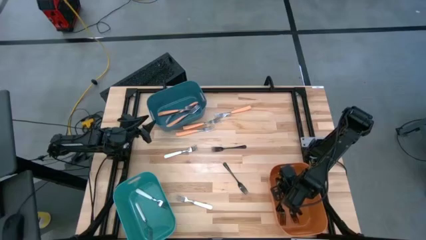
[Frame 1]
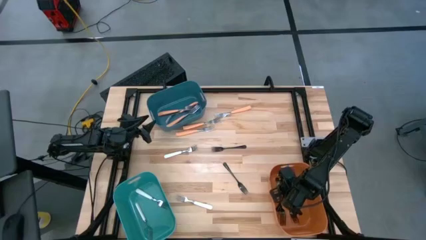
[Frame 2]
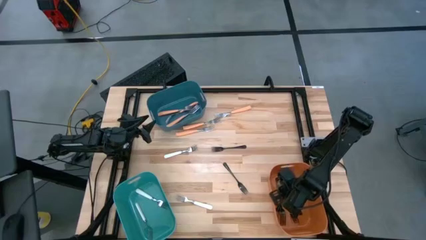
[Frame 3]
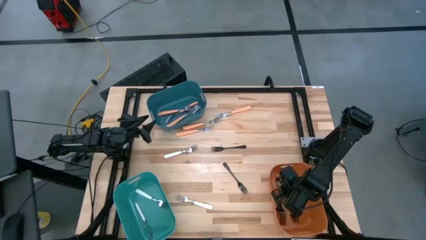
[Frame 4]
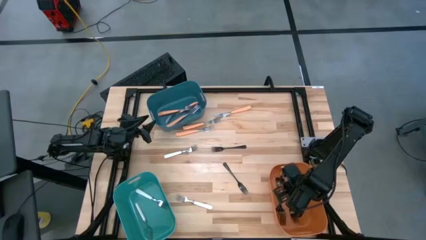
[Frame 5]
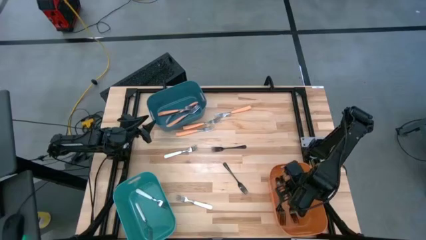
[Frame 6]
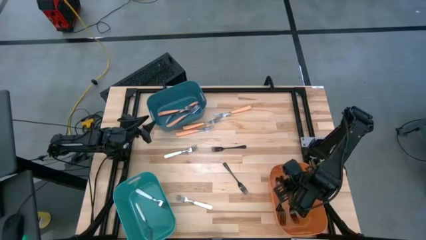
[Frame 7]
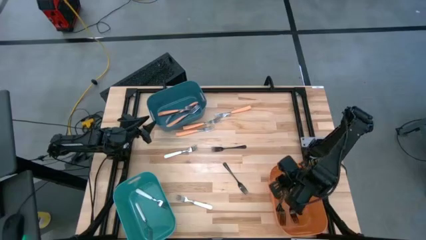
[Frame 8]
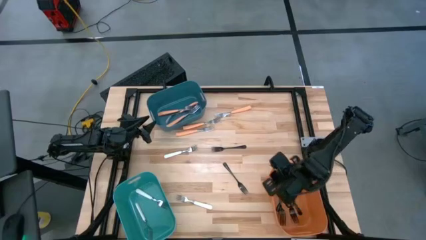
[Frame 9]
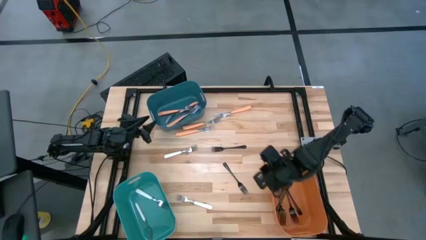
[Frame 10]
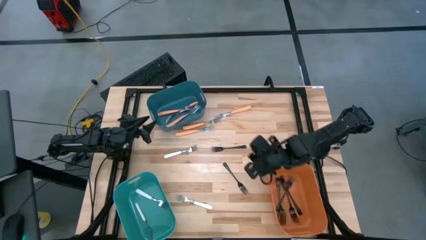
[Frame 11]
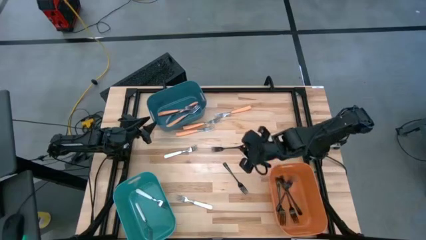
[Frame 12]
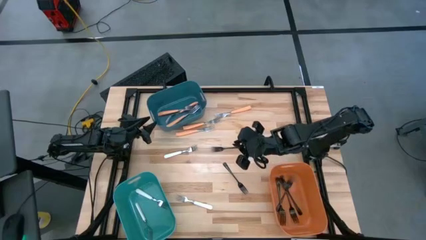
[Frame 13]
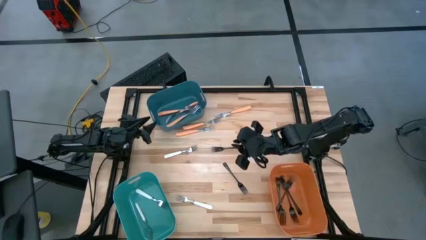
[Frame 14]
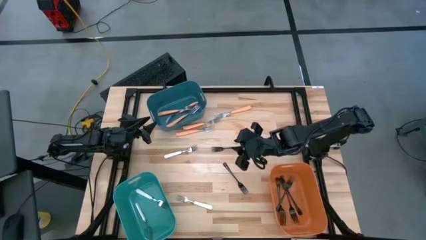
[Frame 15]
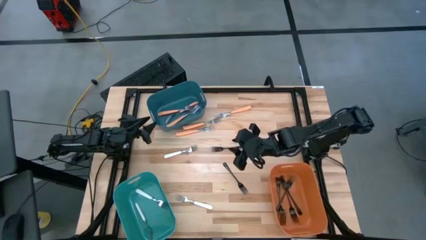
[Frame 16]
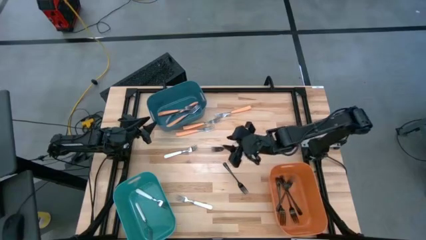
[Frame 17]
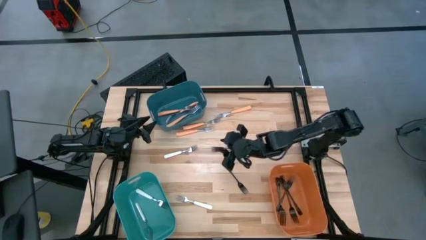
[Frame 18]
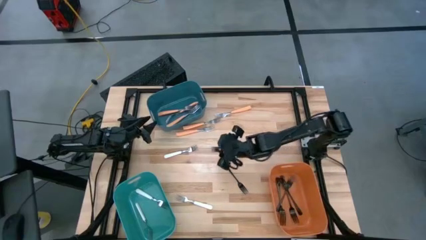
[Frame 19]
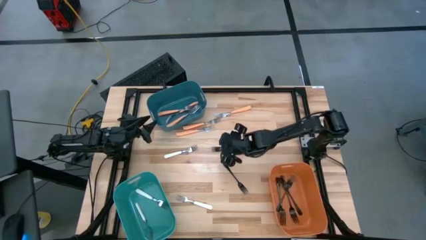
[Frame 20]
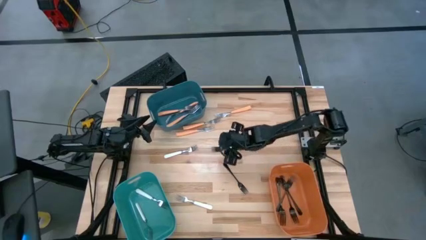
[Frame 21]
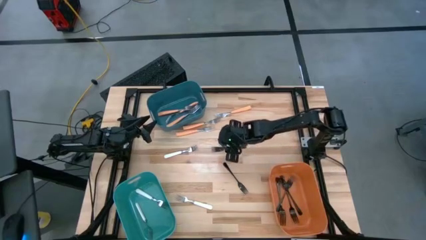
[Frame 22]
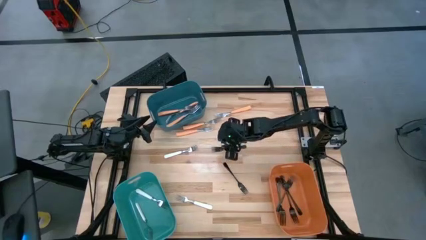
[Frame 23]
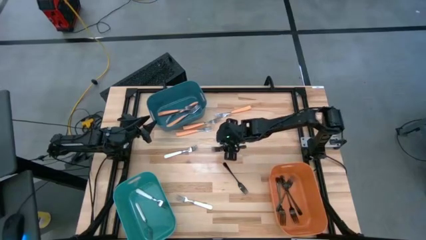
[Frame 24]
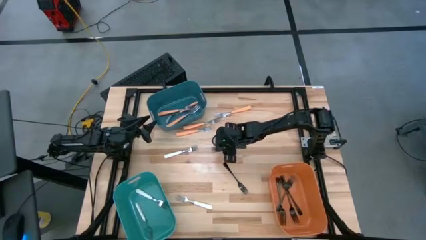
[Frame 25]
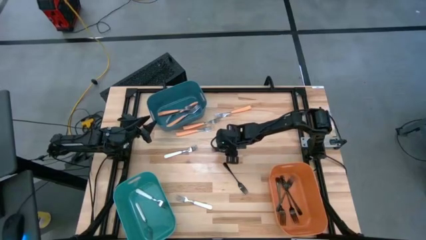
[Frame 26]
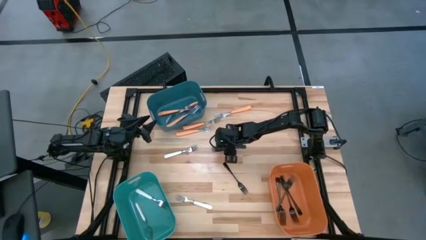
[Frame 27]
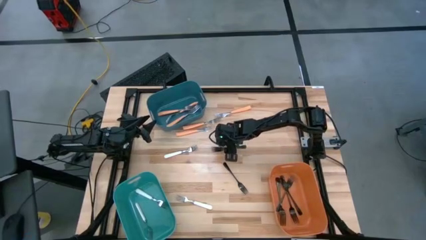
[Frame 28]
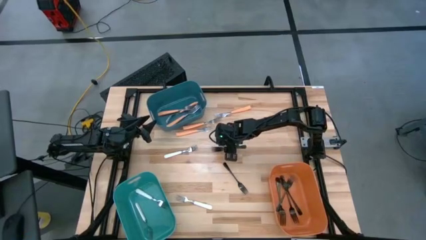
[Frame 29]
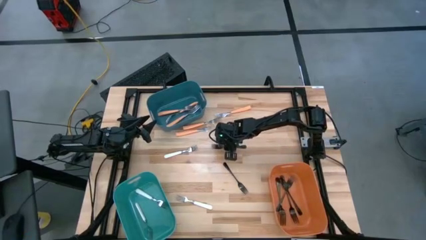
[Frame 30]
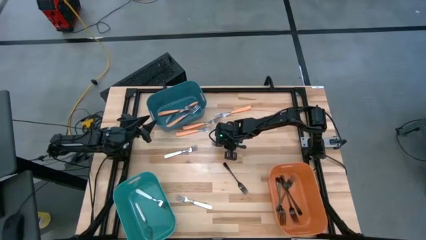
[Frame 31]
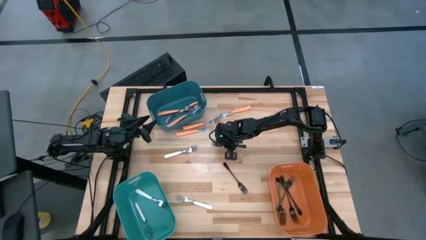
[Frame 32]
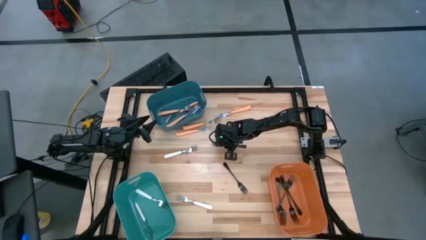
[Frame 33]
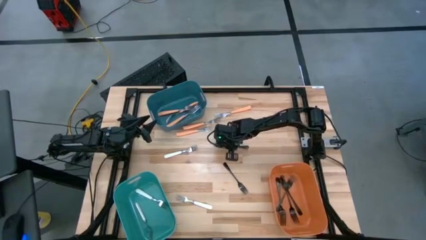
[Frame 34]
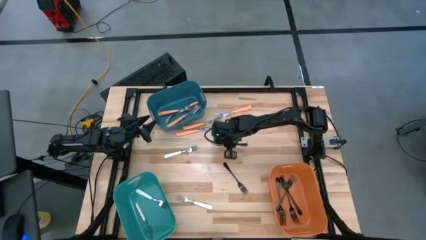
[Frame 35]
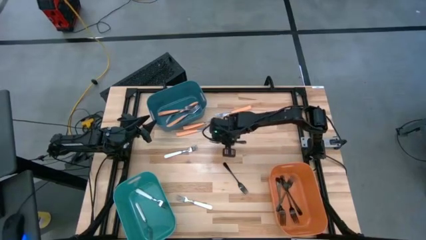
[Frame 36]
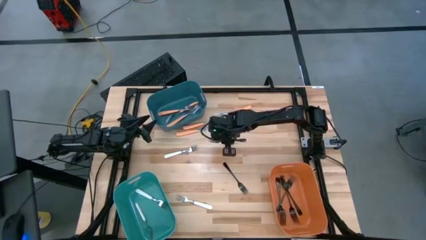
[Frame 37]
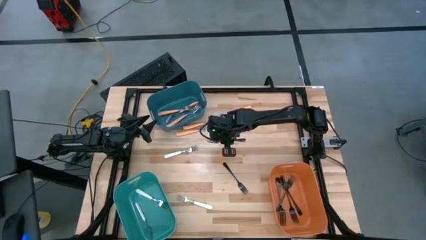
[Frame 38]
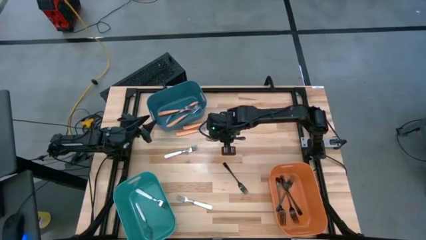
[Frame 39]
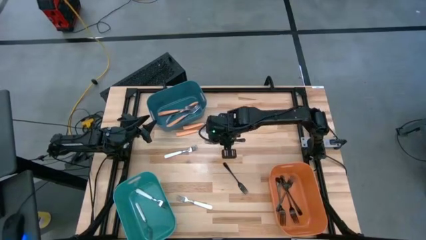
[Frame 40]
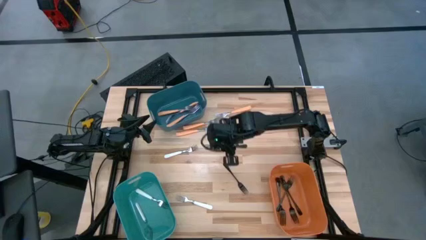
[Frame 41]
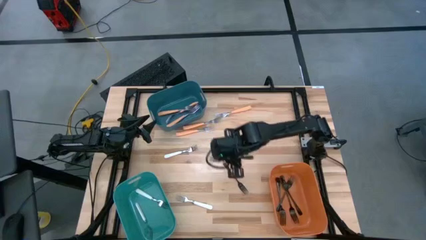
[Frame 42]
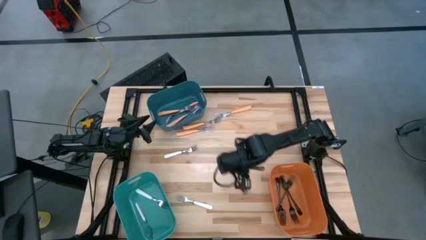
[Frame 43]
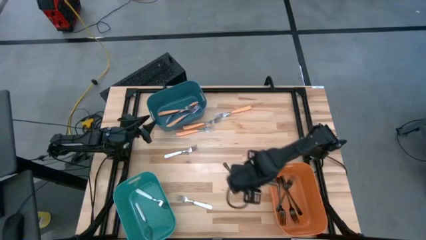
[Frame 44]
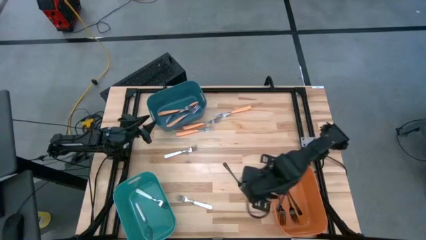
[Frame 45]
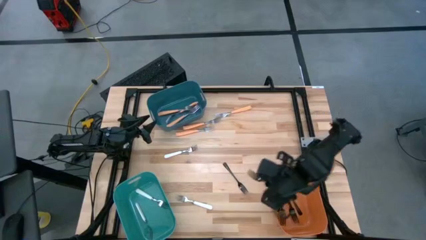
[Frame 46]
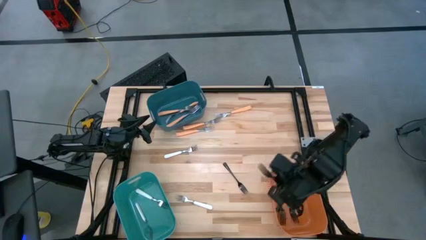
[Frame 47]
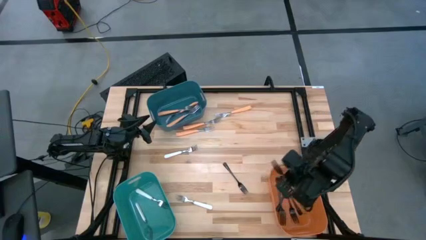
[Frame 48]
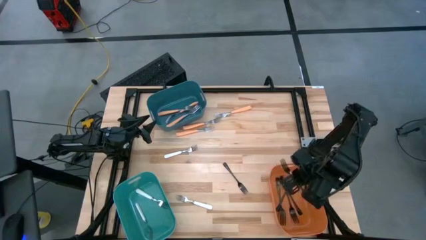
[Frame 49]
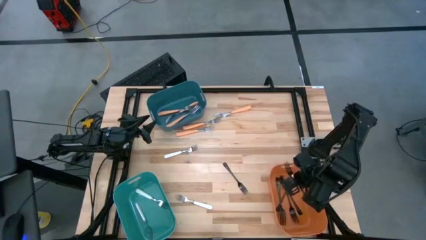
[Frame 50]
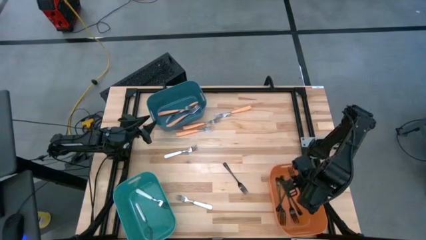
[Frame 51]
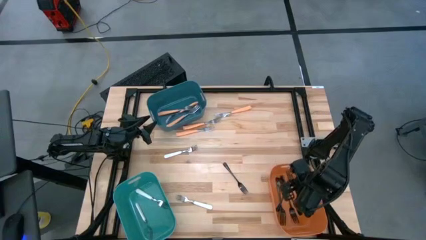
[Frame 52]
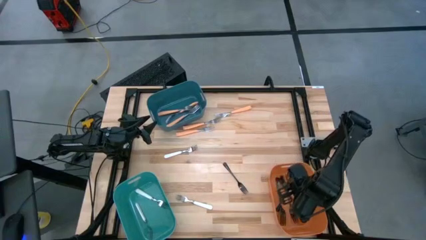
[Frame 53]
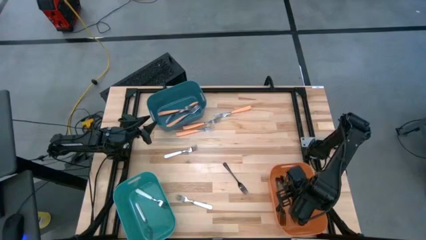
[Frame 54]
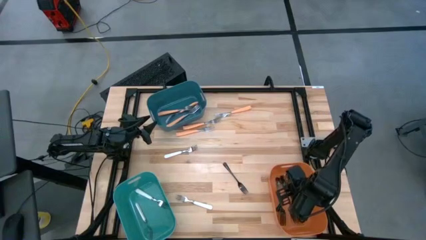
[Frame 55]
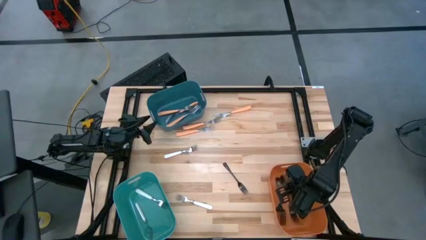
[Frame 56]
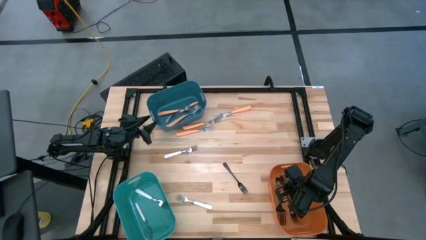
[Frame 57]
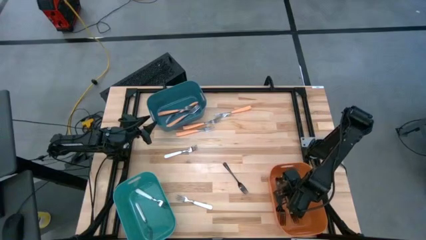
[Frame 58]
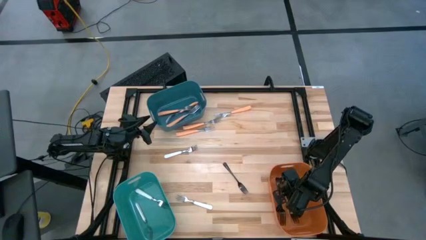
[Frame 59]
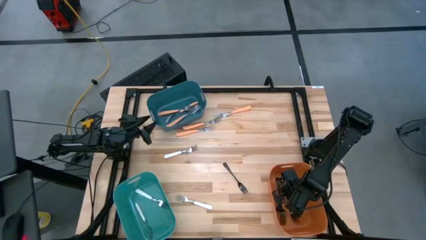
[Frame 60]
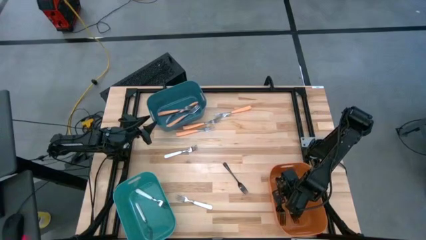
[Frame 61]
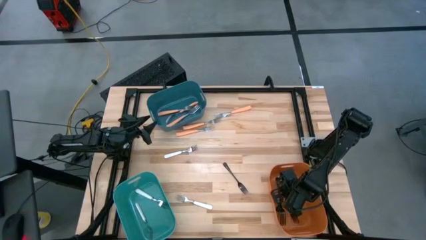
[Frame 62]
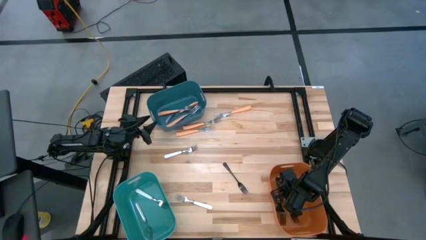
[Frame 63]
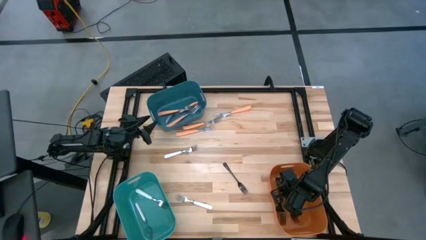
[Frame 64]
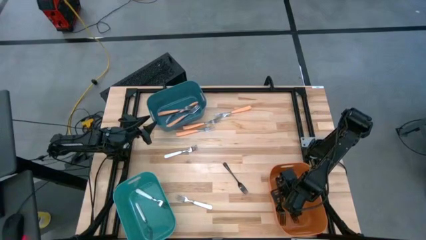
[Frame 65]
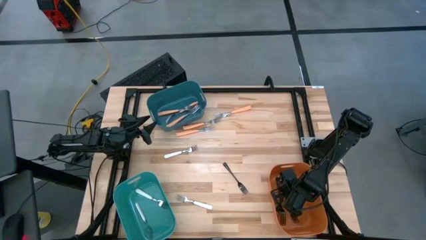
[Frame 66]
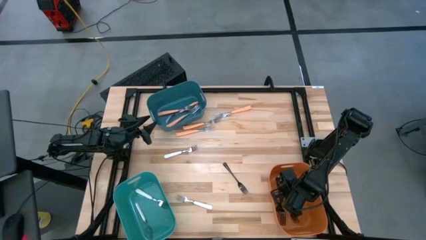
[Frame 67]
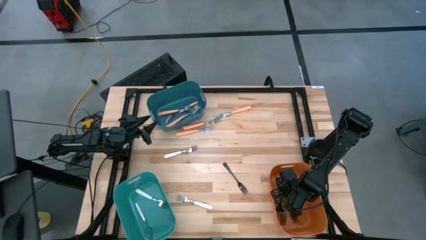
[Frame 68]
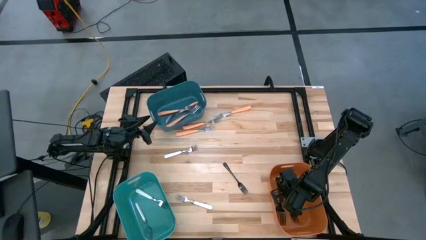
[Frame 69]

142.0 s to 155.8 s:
Task: Sort silverware by color (type)
Put the black fork into the orange bin
